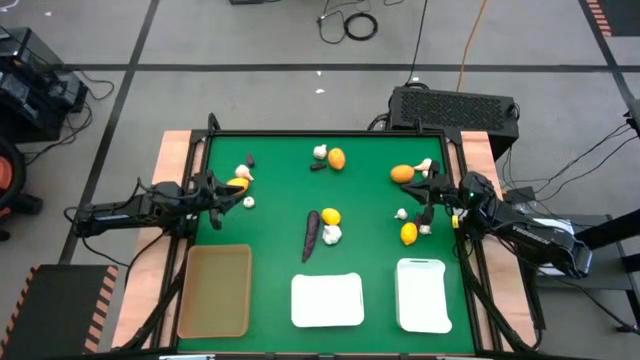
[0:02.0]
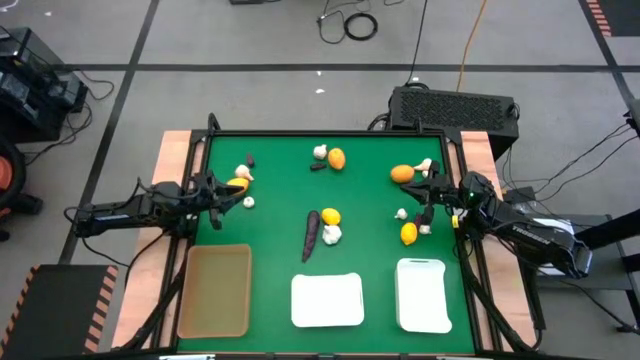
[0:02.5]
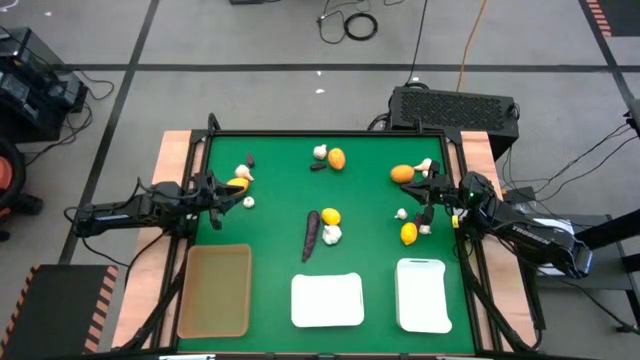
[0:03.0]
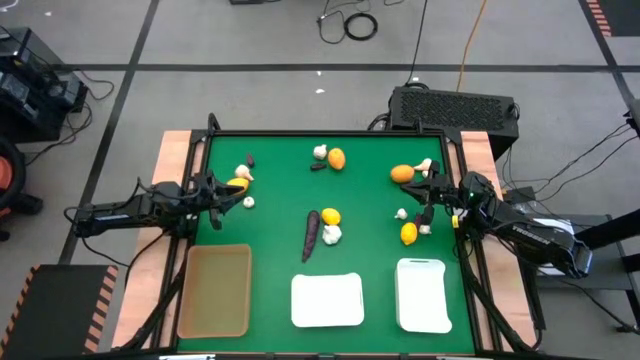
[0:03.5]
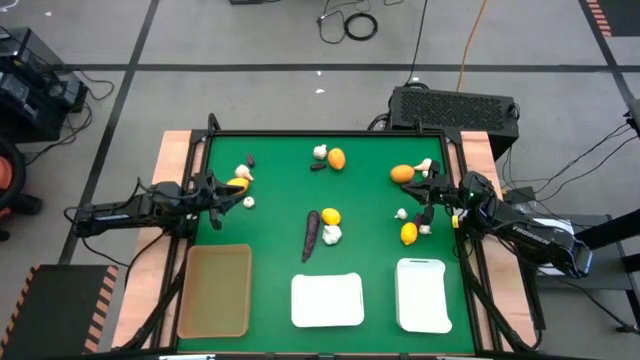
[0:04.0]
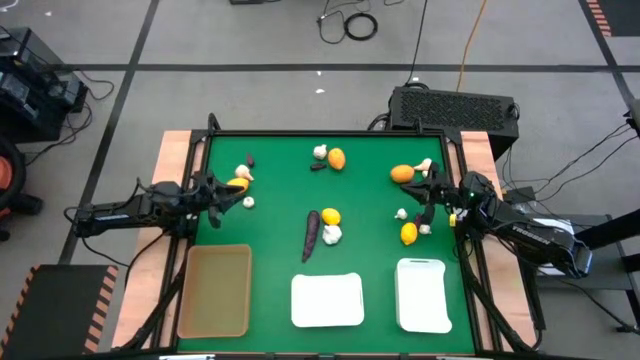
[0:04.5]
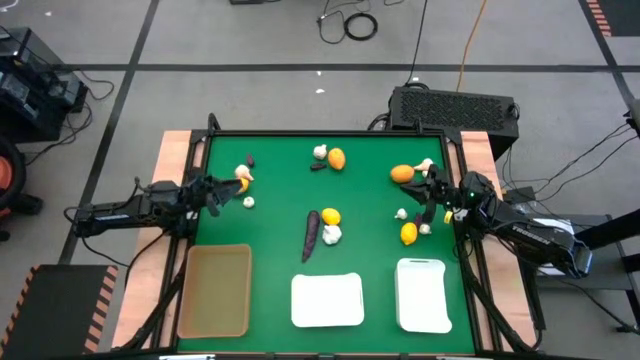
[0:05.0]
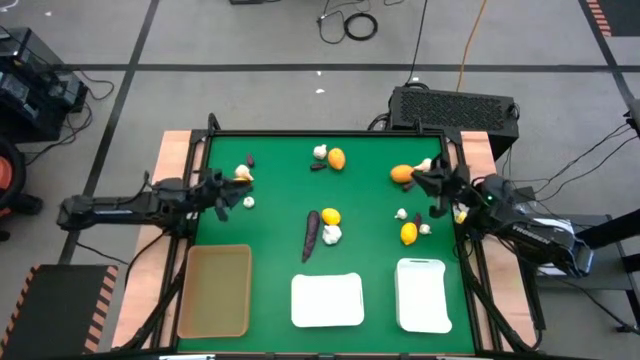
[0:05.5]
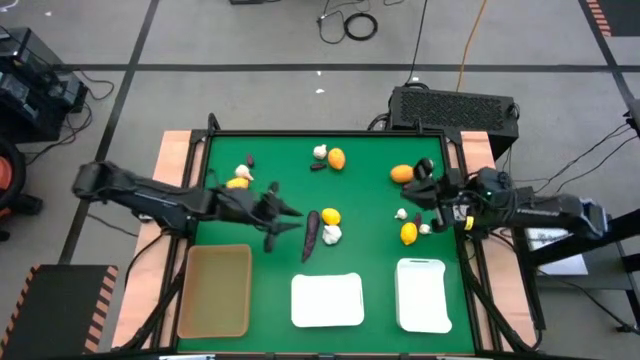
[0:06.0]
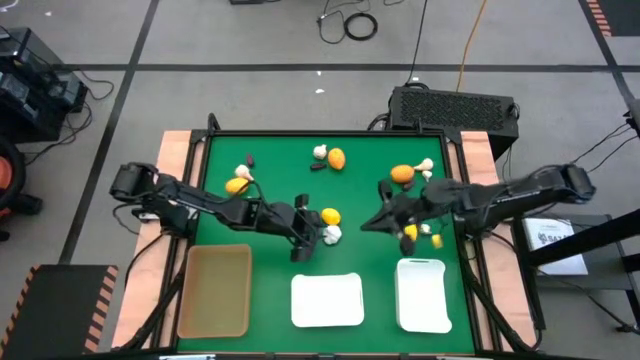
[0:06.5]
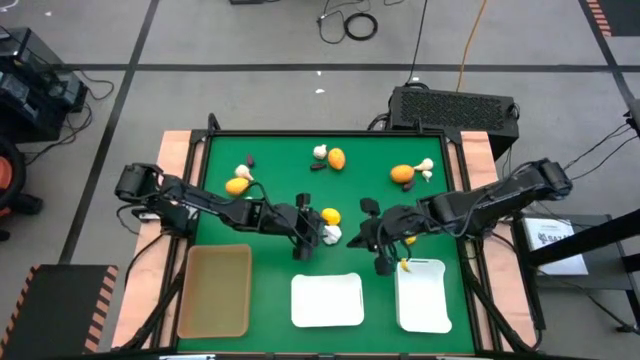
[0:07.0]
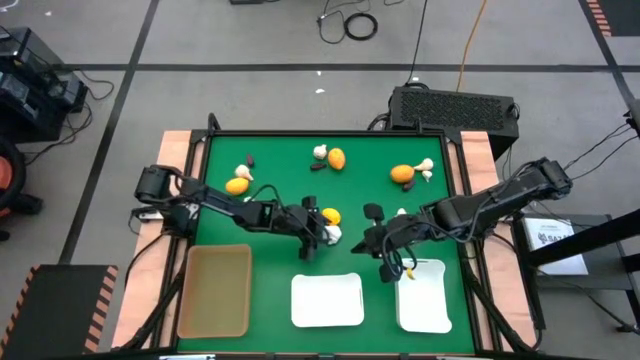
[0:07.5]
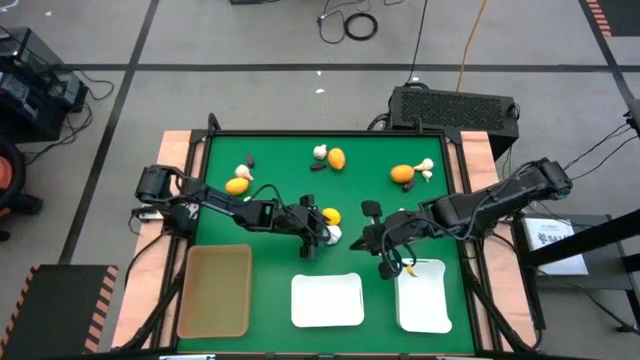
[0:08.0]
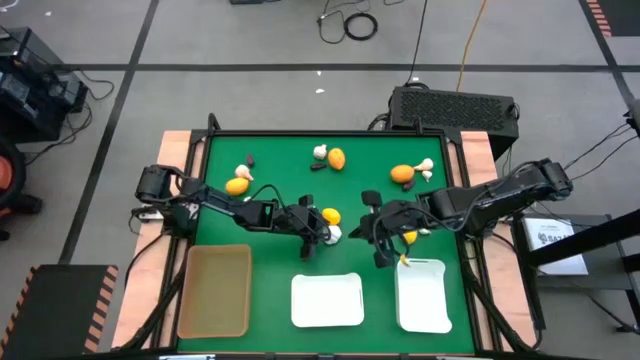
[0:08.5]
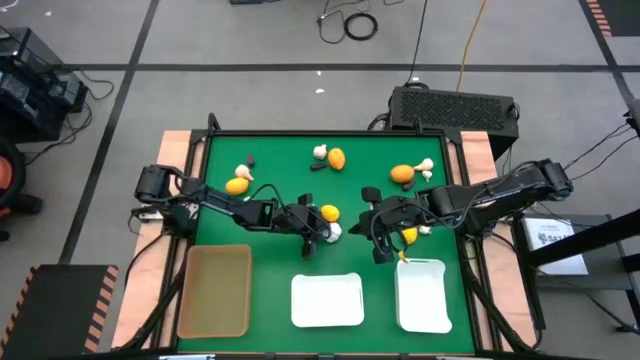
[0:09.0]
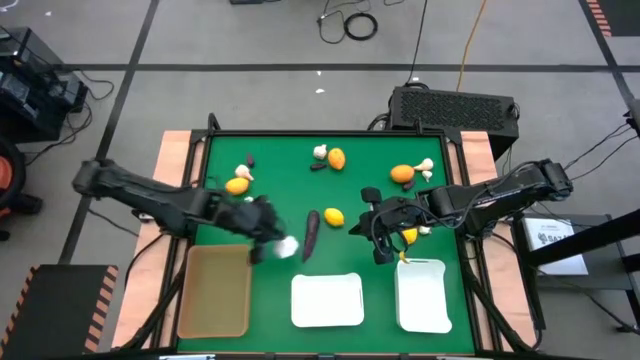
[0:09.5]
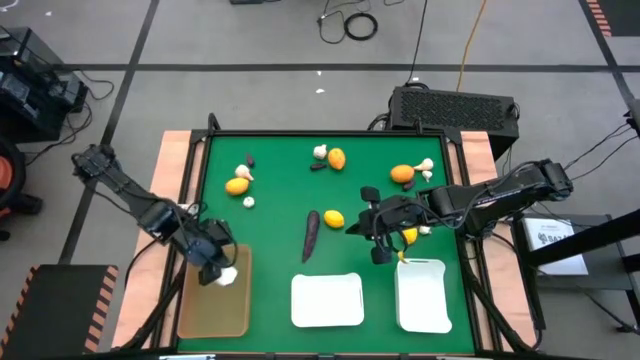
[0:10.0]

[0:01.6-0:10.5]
Task: Sort produce into baskets
Put the garlic into the orange bin

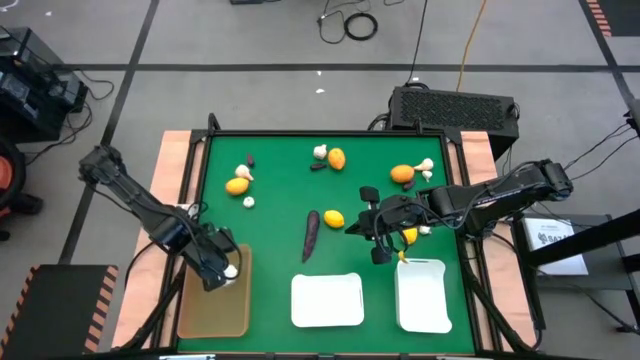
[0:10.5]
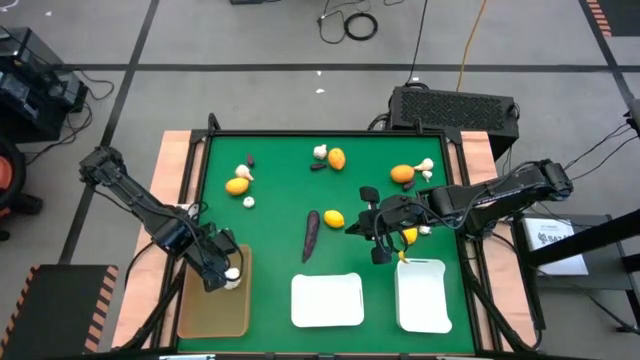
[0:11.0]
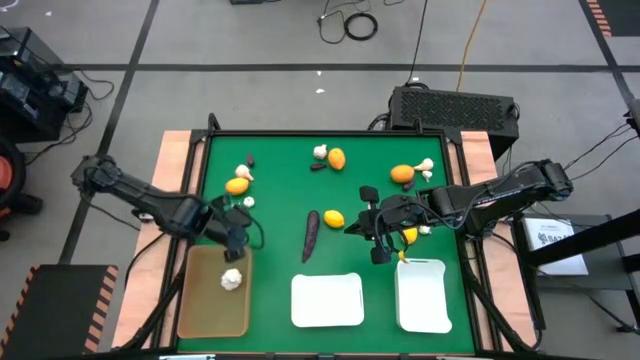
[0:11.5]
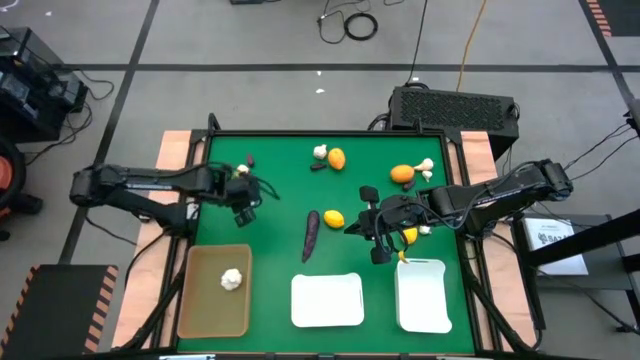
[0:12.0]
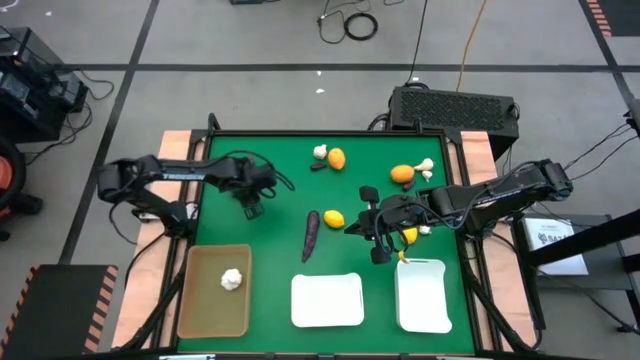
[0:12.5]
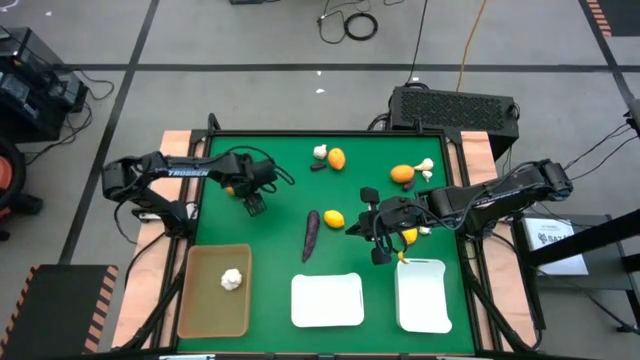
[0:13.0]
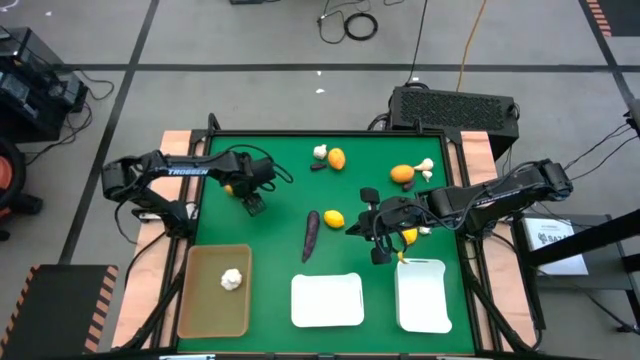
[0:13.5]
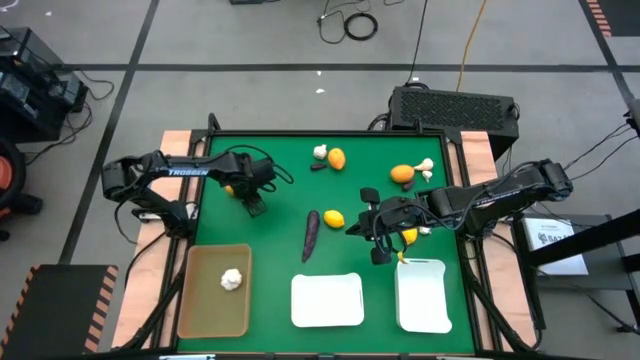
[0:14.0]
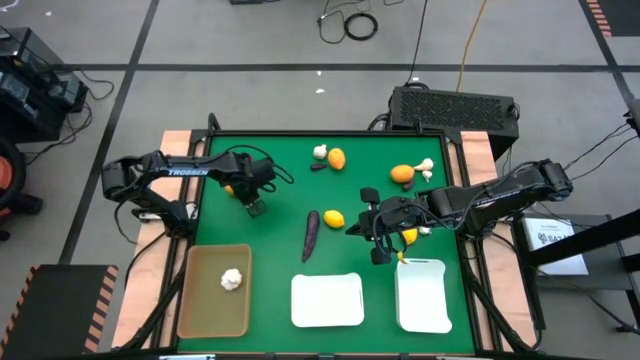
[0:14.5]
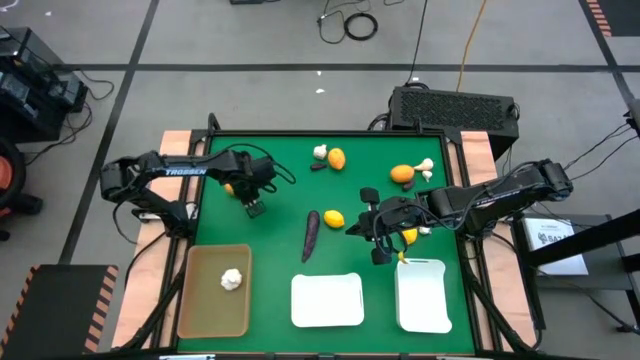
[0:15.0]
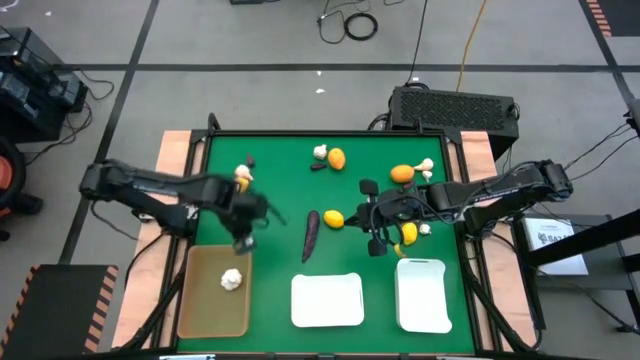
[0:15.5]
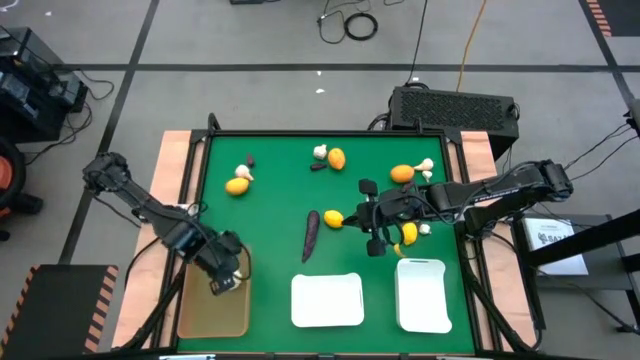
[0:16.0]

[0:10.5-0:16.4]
Put the garlic into the orange bin

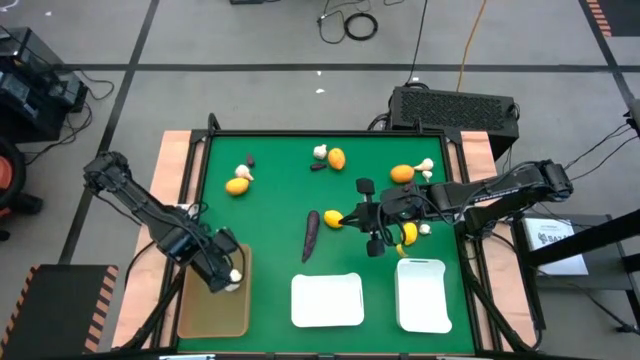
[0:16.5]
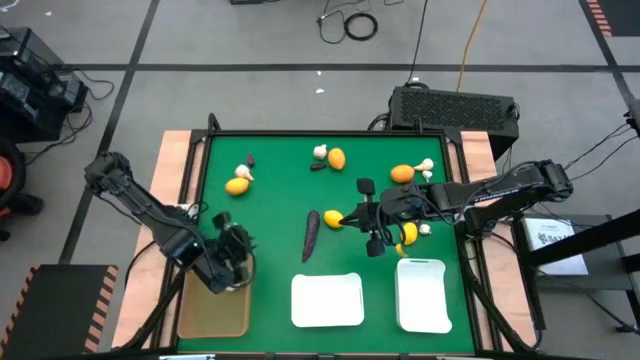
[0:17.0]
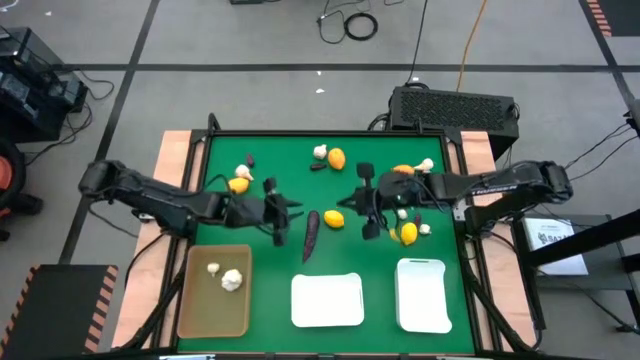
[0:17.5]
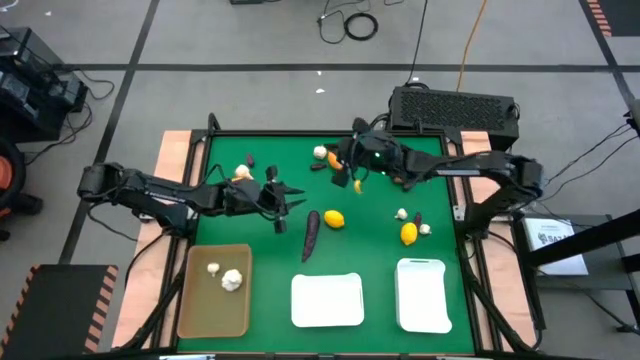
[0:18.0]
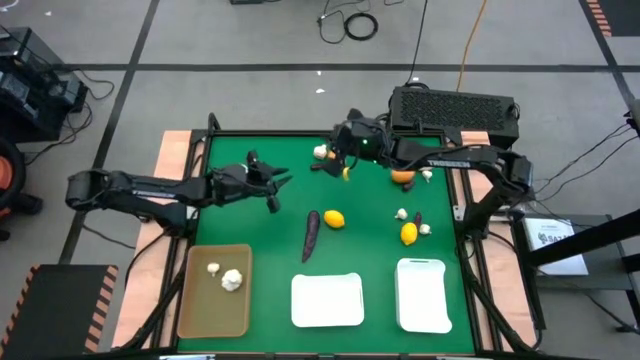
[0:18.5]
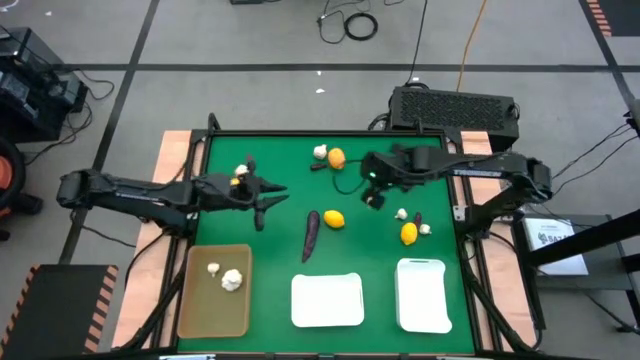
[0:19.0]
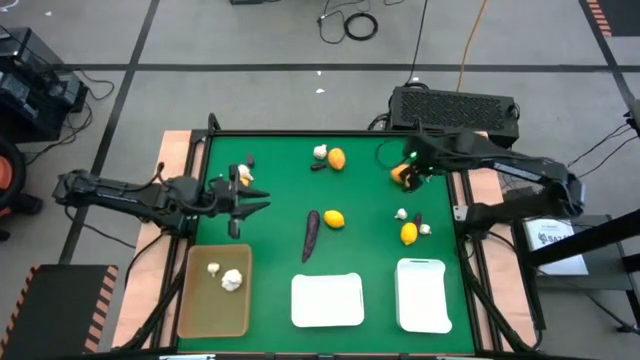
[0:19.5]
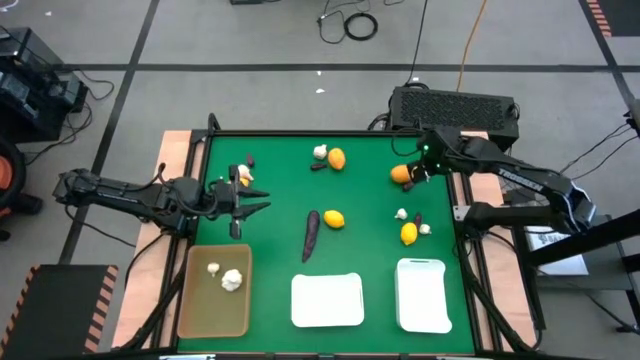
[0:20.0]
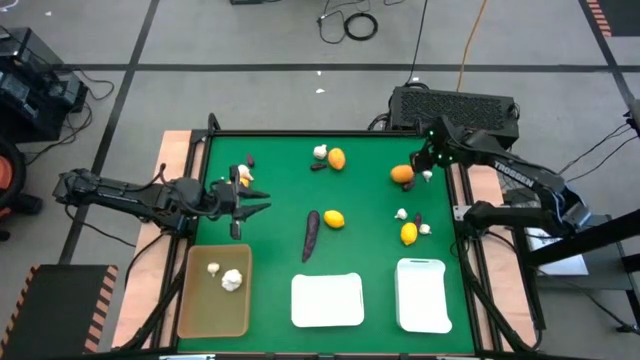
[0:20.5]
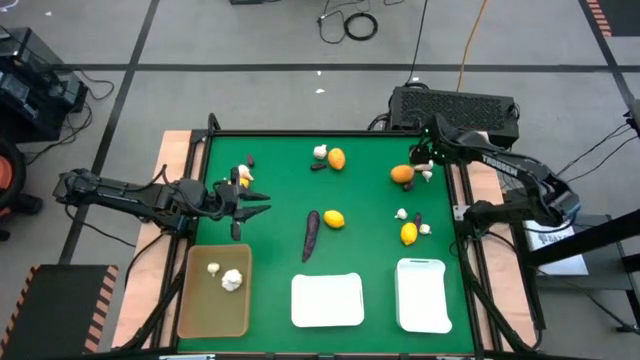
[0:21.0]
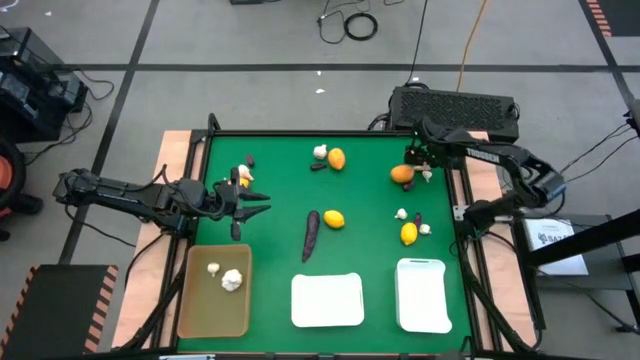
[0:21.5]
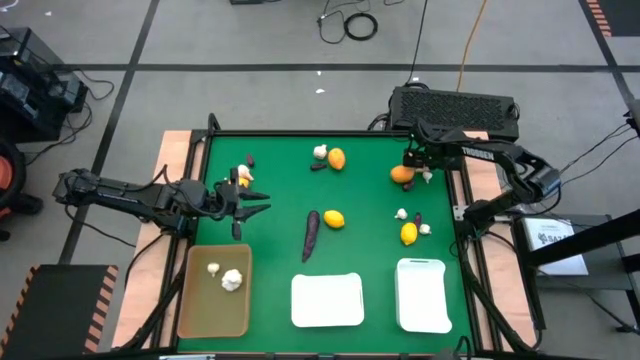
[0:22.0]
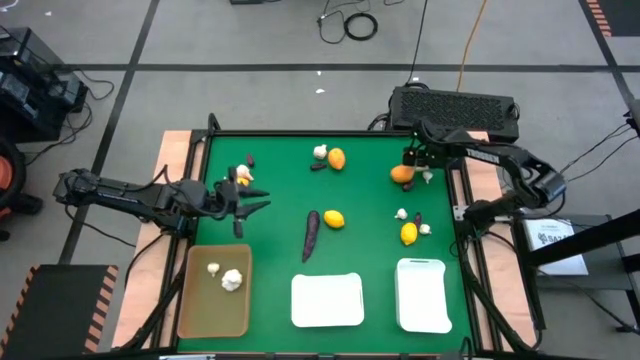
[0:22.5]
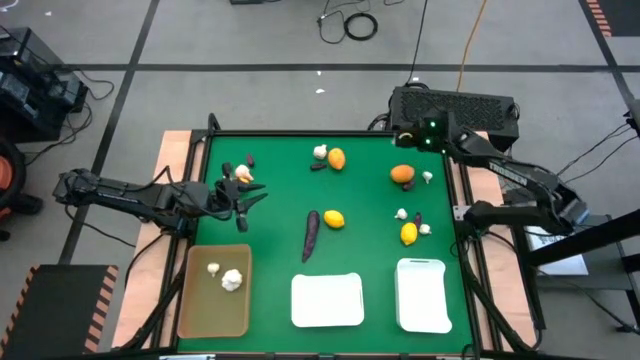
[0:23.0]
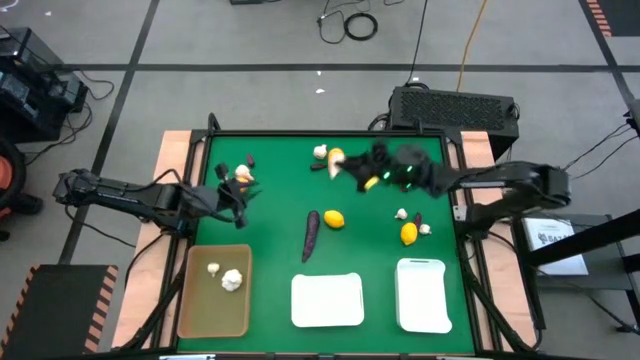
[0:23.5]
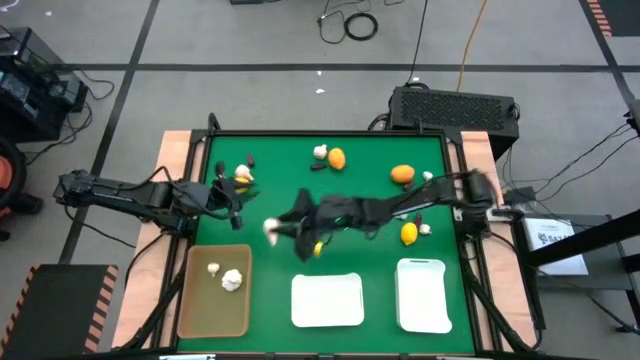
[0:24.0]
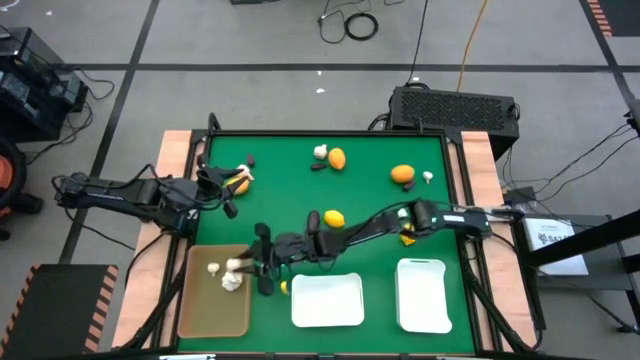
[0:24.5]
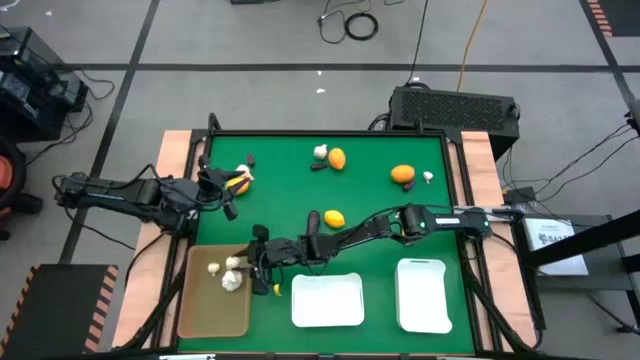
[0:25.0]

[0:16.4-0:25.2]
Put the garlic into the orange bin
